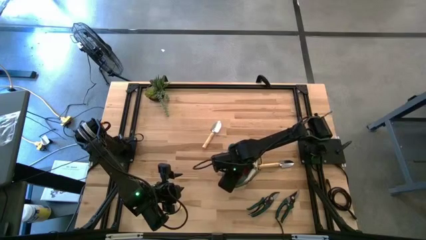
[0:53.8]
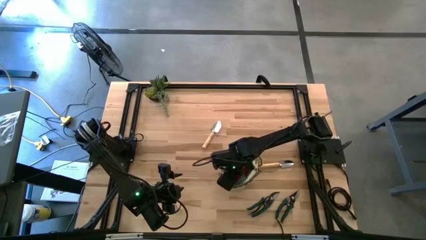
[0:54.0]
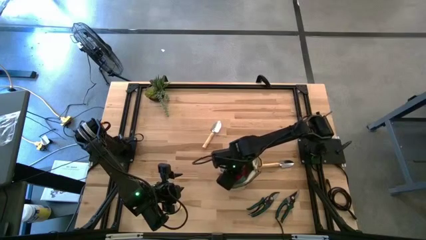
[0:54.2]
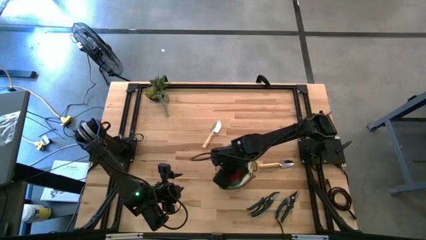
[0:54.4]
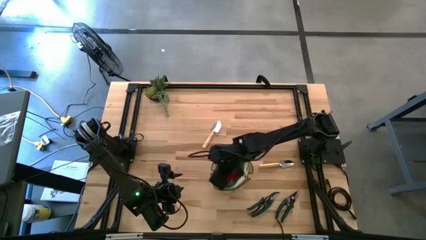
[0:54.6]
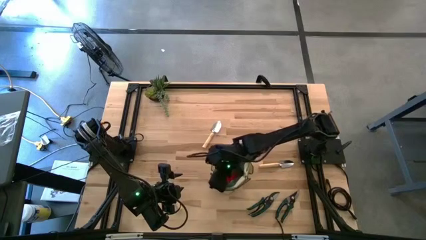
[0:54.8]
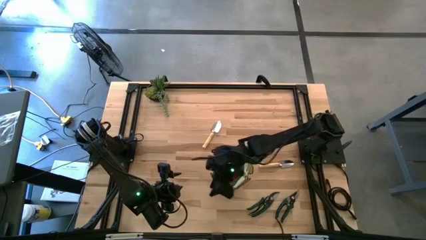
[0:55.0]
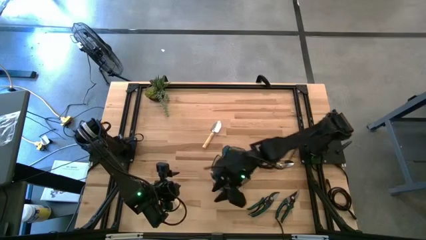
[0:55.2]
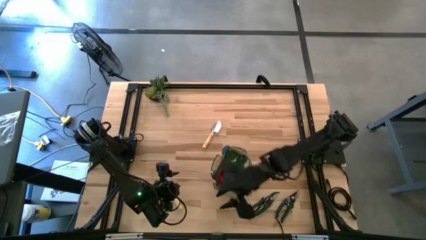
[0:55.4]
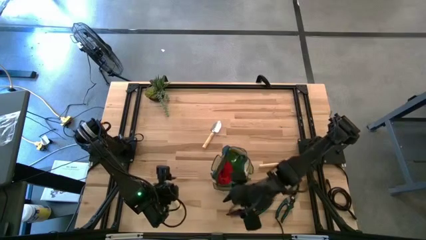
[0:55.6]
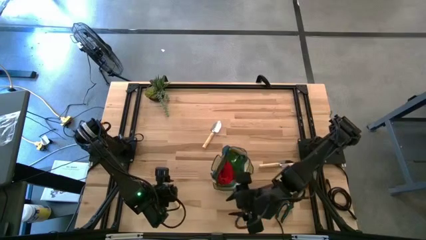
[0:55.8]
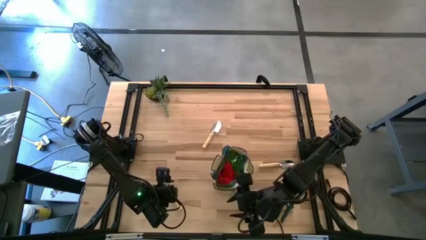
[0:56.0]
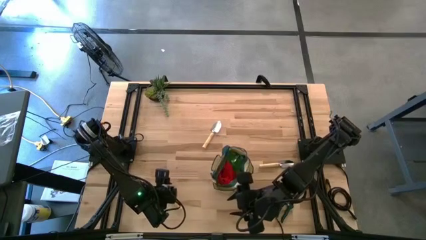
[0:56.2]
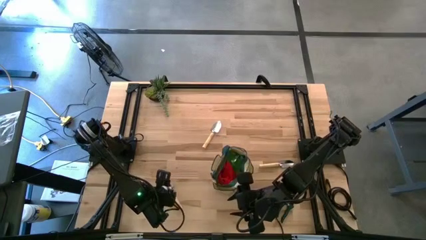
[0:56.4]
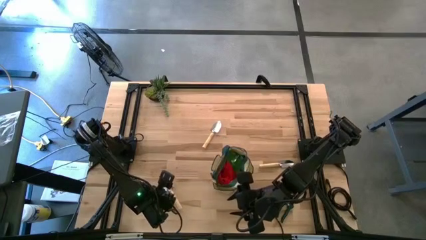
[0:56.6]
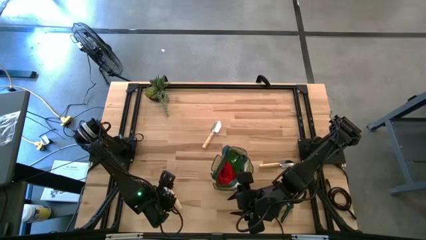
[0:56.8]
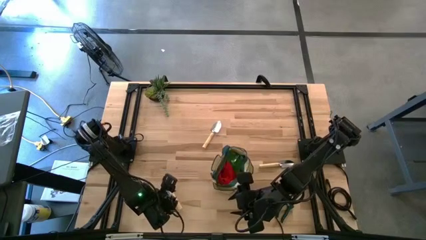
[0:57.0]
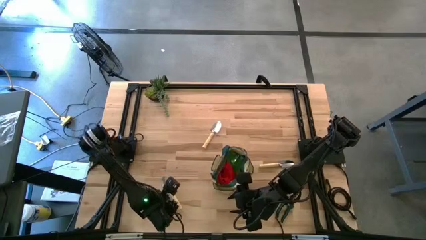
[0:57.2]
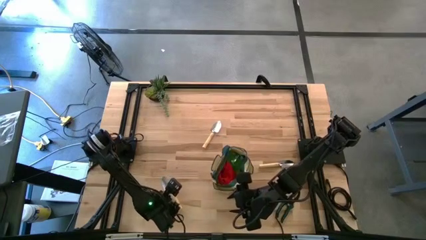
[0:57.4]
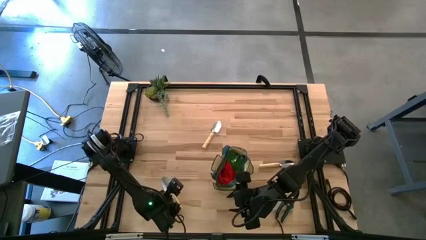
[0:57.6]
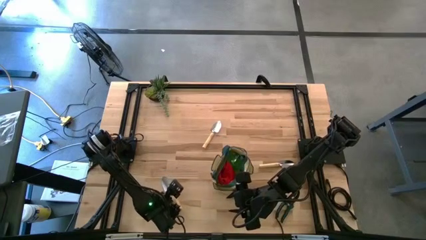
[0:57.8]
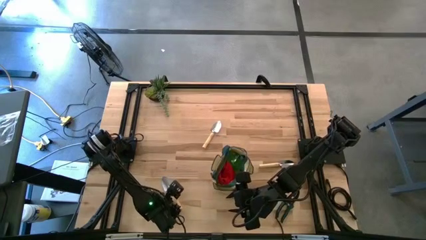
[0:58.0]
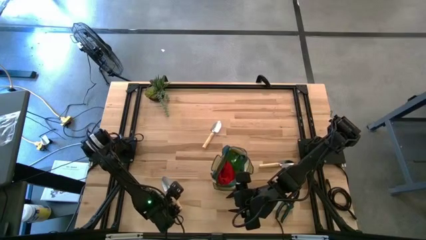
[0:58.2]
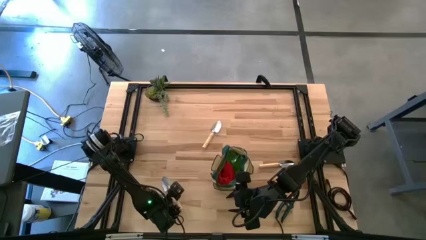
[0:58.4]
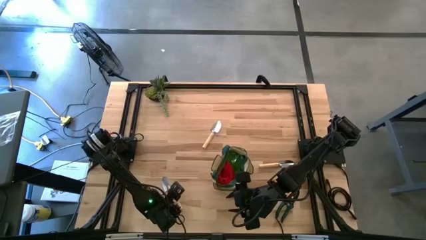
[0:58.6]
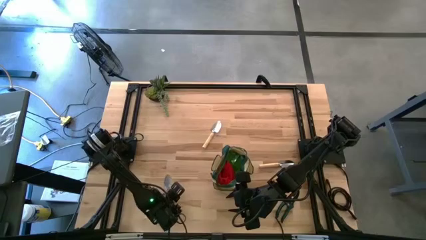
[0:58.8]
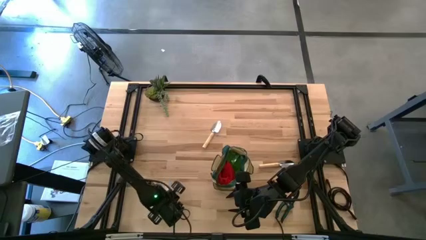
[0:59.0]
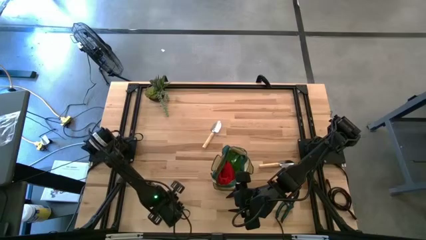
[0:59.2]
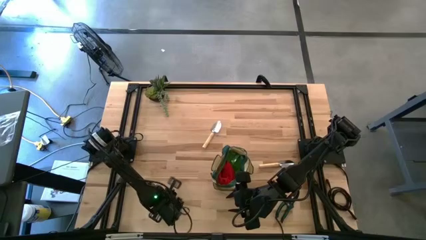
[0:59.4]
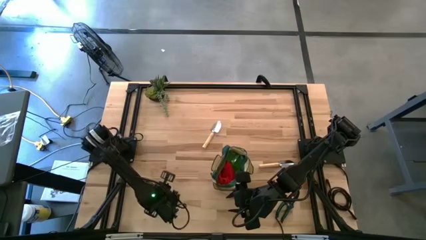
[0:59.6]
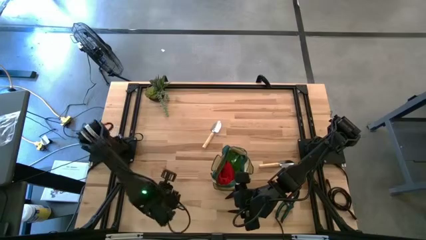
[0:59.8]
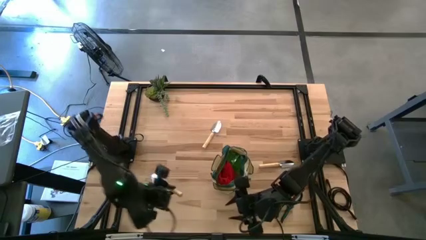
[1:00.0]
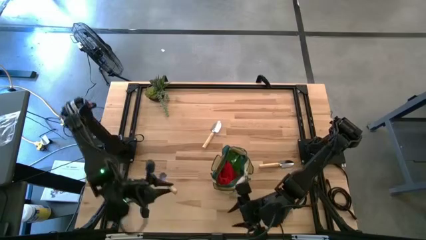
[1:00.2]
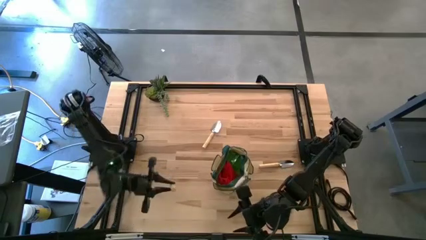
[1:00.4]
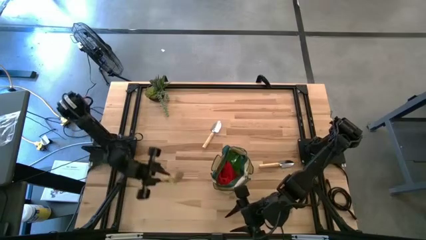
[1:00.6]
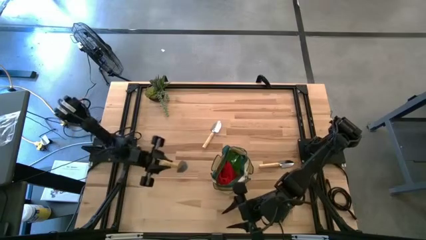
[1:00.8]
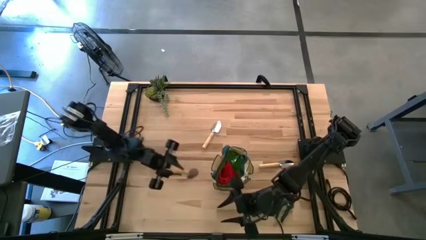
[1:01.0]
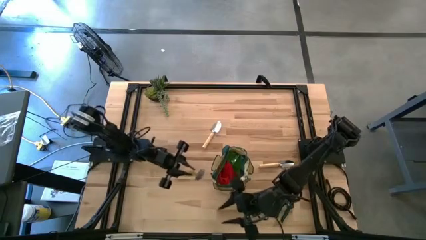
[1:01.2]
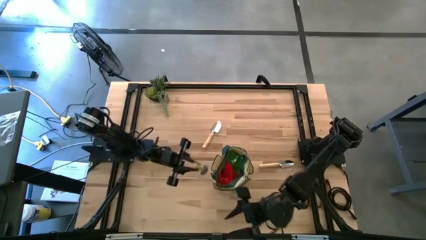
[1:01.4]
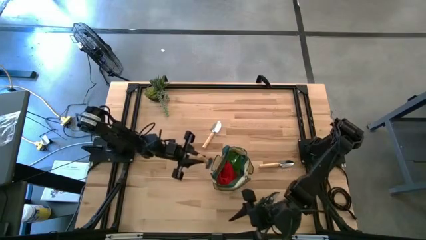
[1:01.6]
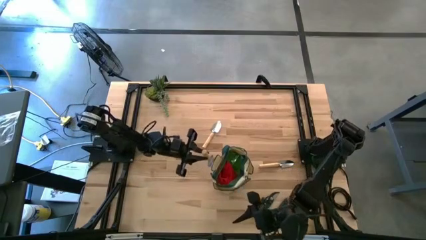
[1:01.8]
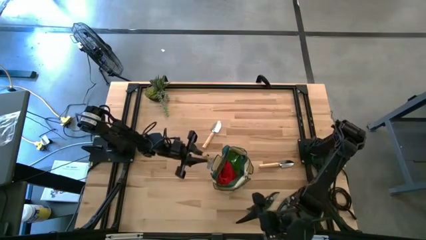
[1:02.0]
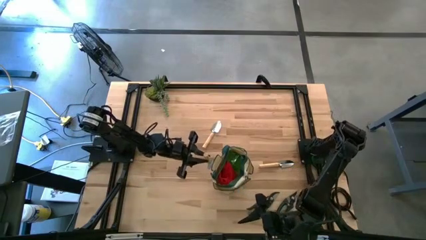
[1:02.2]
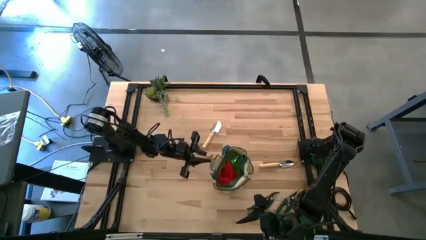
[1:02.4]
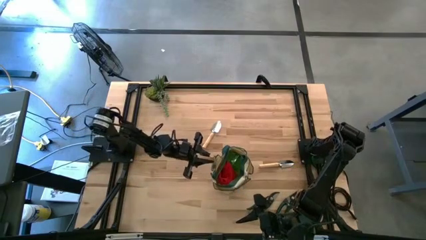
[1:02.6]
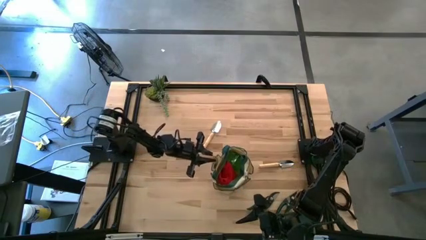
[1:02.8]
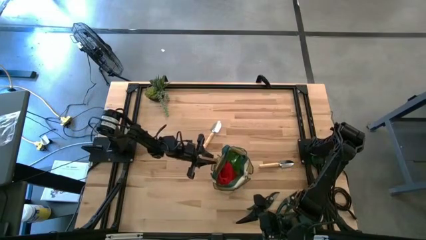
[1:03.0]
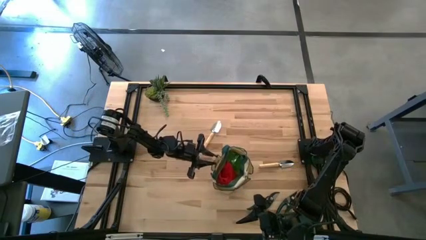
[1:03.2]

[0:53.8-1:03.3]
Task: Pick & Place Garden tools in Gardening bag
Put the bottom left trowel into the light brown gardening bag

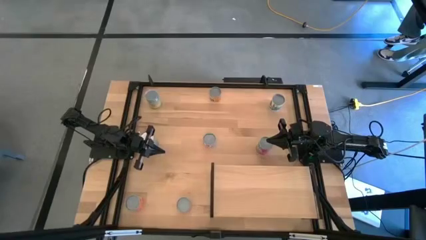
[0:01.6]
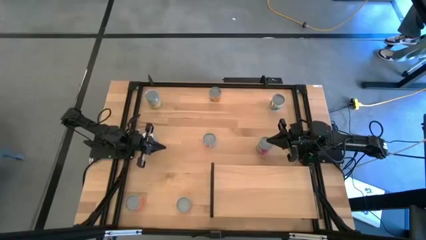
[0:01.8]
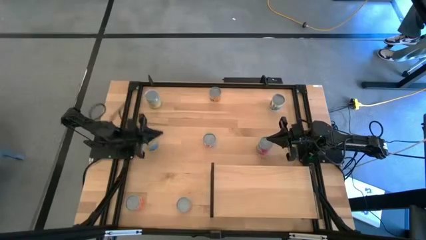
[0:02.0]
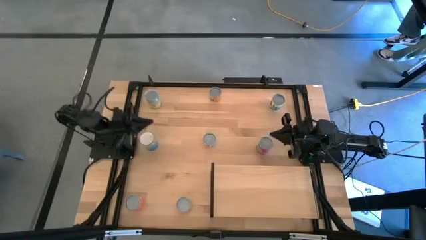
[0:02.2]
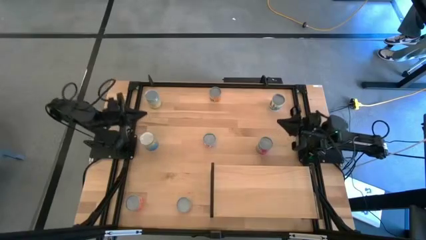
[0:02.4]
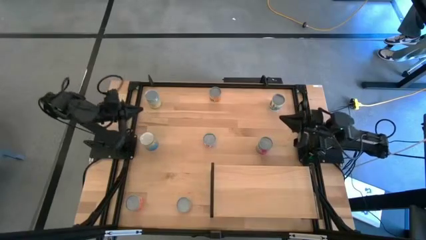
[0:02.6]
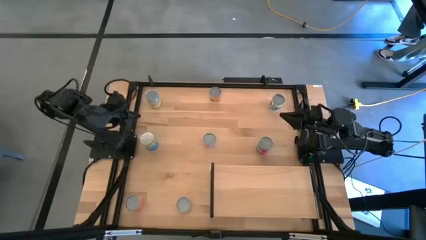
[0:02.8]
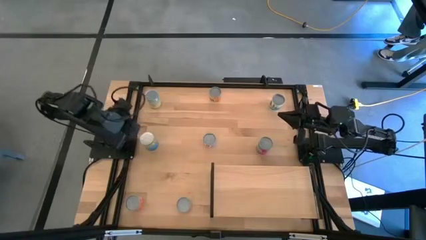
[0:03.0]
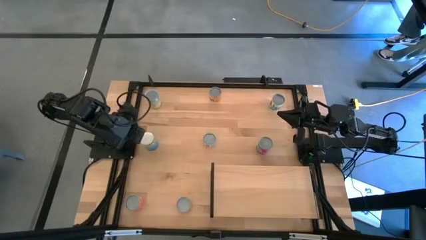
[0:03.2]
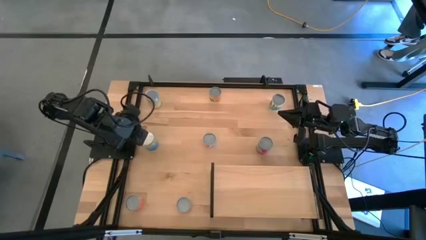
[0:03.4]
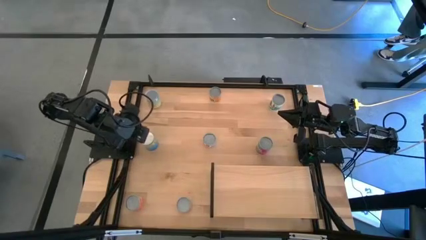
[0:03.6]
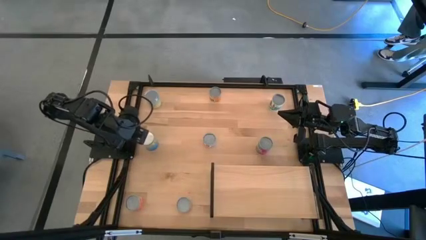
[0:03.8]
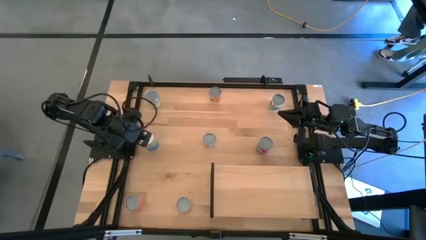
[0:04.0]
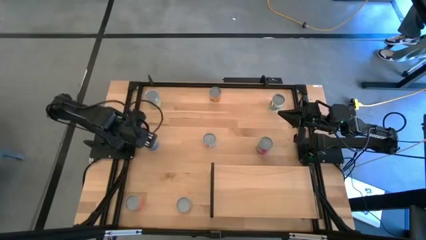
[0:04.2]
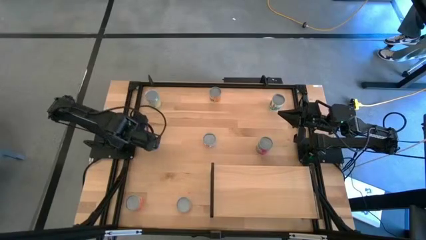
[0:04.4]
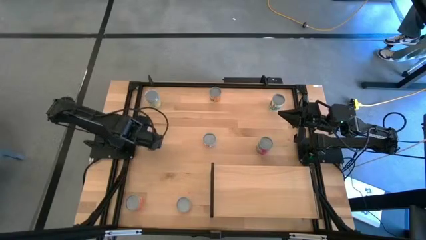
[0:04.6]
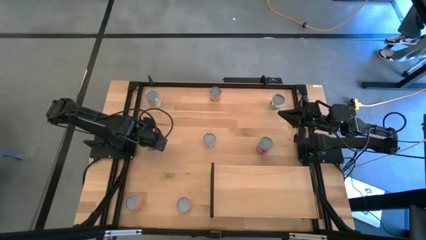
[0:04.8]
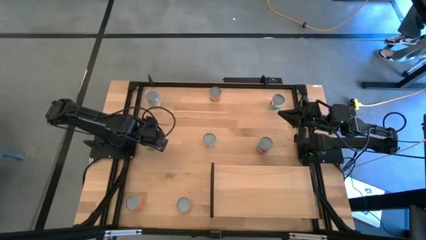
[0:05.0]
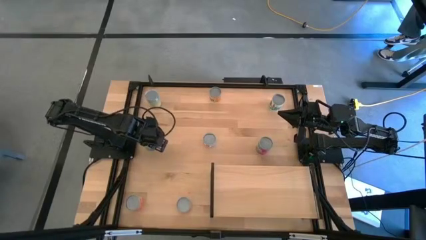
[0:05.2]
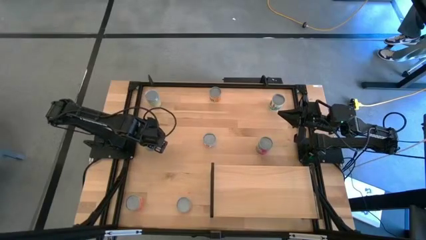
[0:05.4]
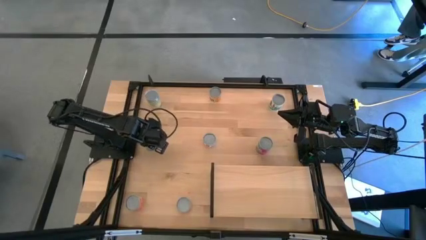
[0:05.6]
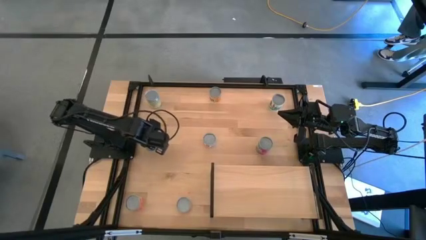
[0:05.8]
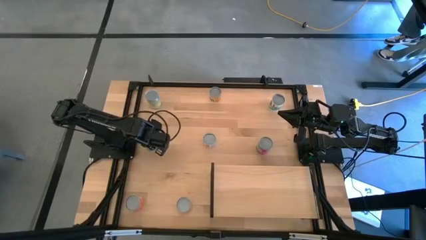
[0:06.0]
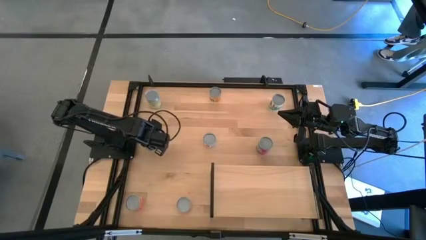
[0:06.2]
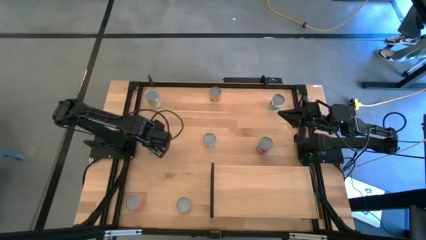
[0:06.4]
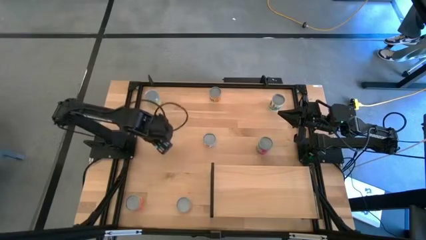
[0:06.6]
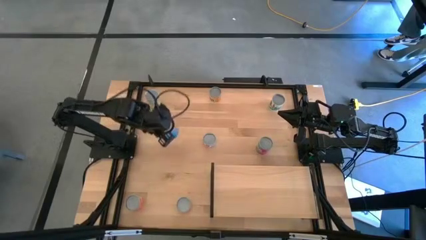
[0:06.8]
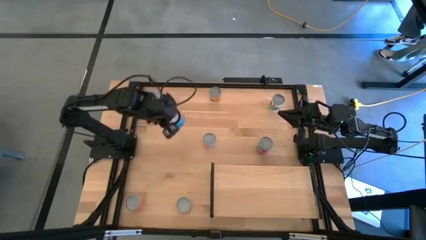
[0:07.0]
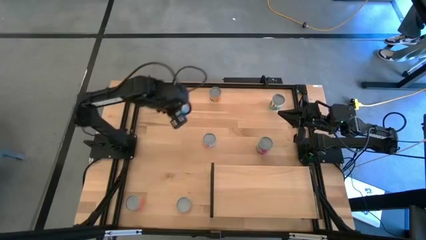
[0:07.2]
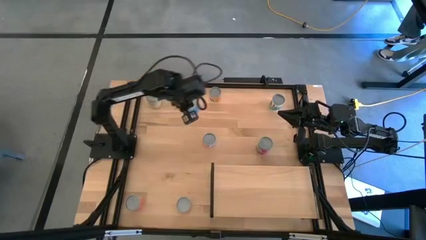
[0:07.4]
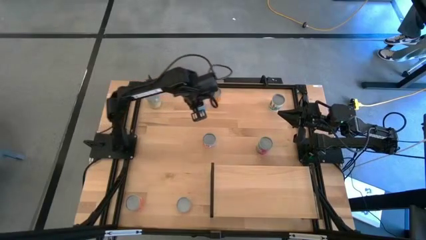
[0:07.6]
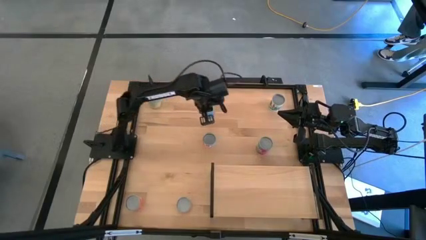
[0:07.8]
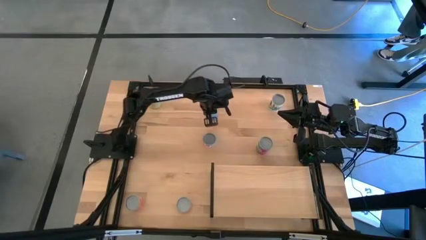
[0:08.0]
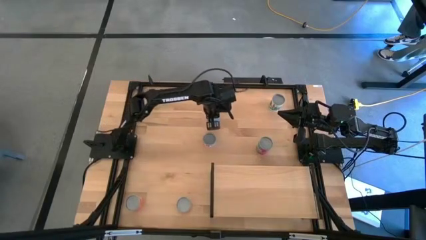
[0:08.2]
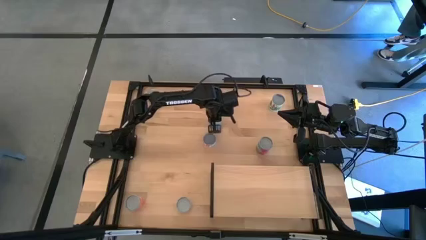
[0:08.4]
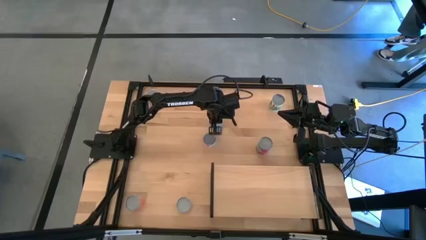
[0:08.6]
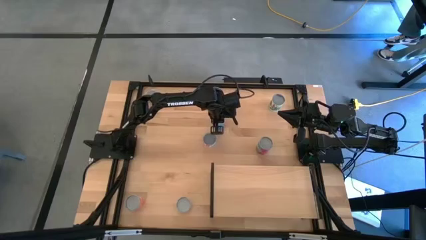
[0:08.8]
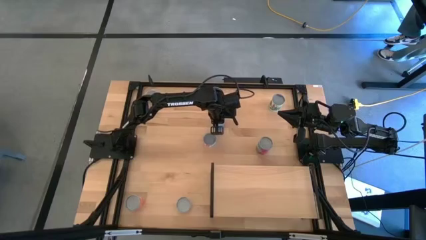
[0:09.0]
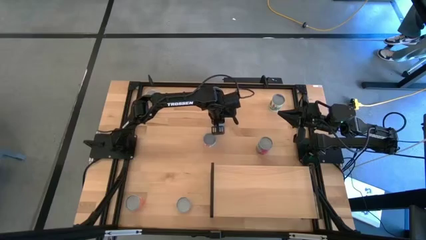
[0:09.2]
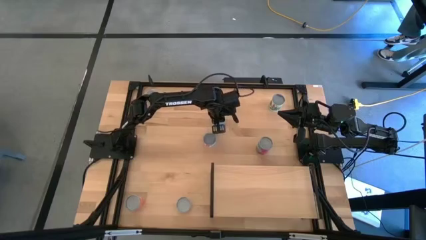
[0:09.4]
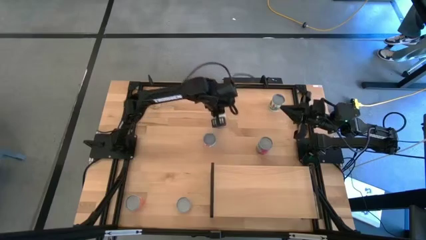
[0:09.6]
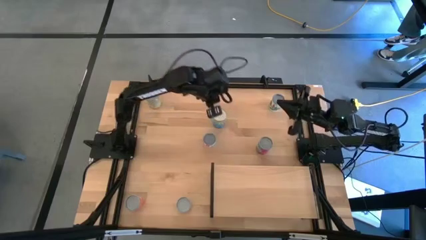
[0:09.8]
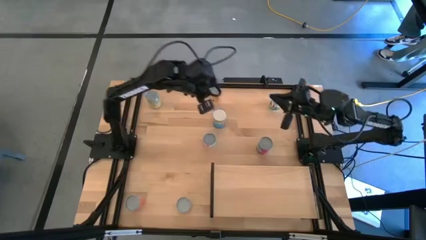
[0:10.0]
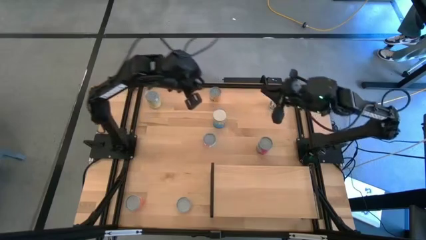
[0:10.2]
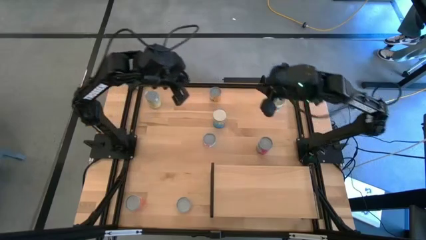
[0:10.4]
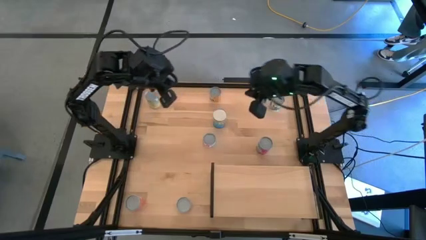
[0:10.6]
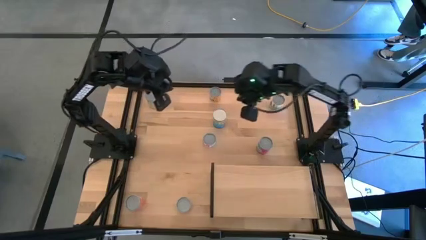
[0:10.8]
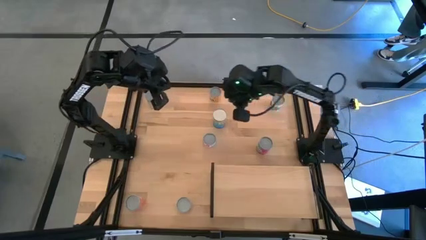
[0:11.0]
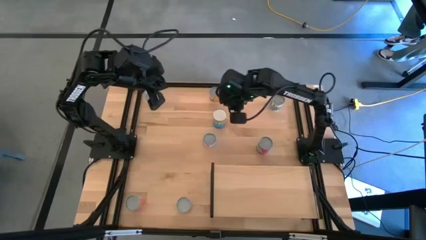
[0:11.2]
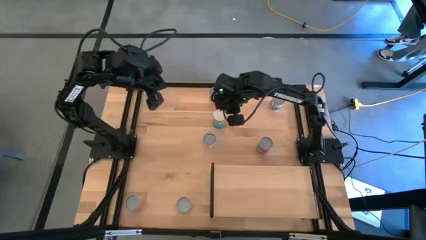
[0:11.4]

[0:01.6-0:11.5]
Task: Pick and place cans onto a shelf
Put the canned cherries on the shelf
